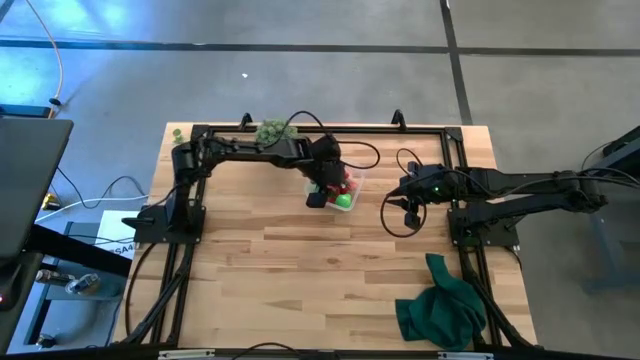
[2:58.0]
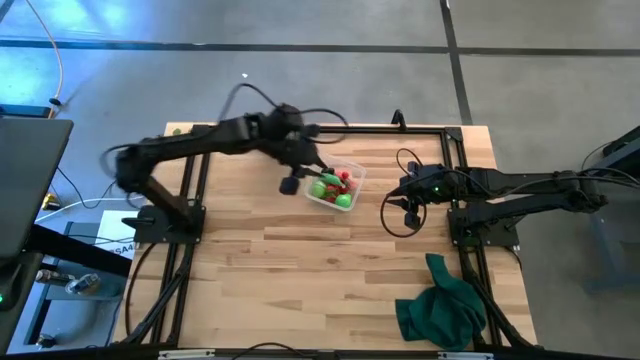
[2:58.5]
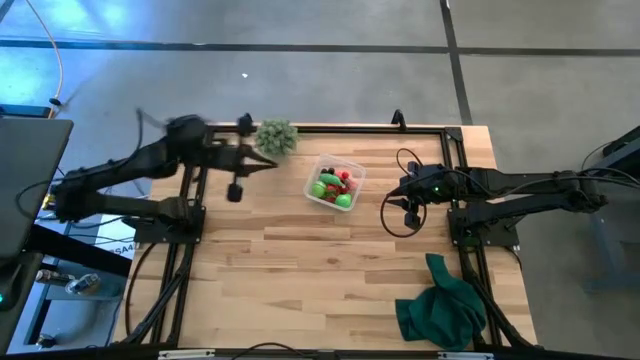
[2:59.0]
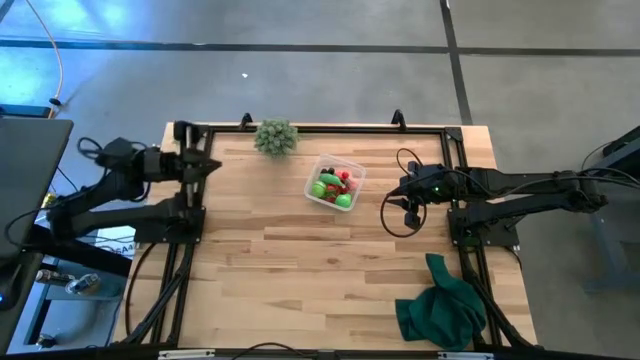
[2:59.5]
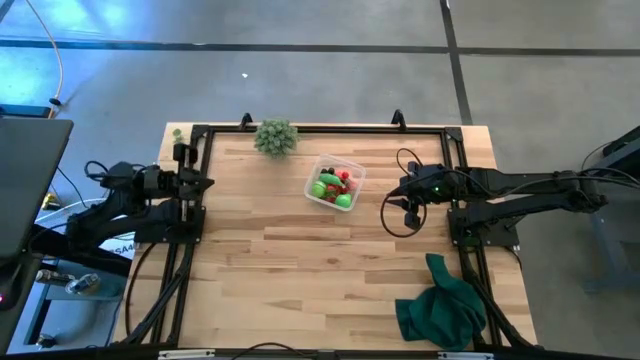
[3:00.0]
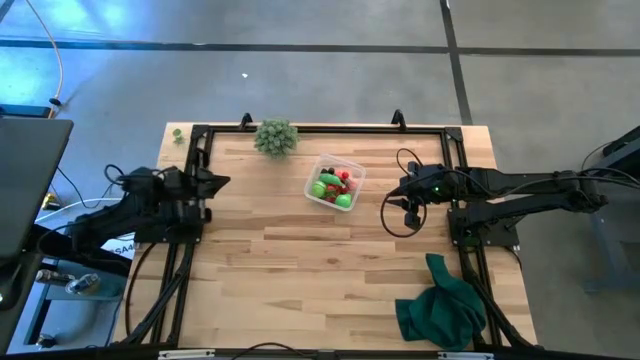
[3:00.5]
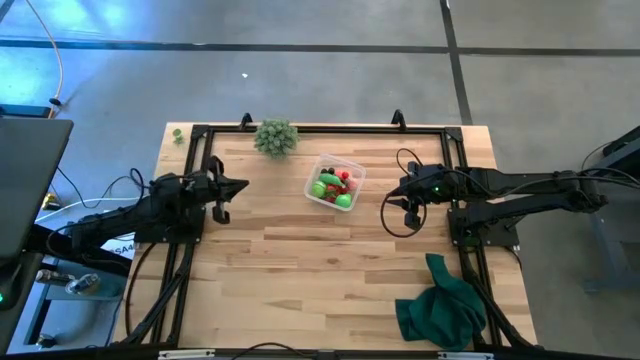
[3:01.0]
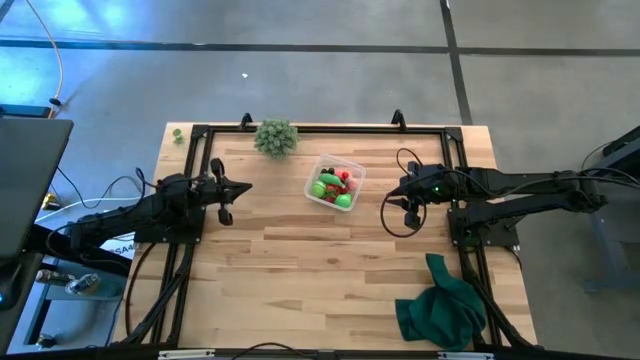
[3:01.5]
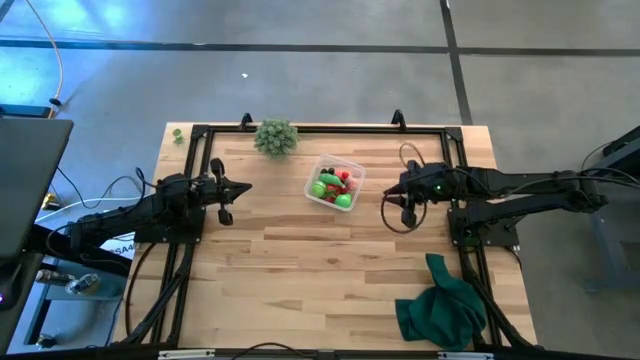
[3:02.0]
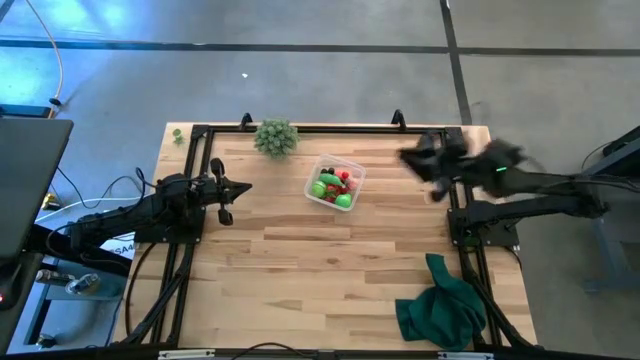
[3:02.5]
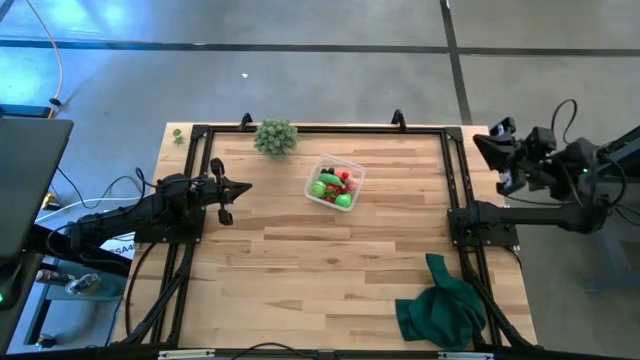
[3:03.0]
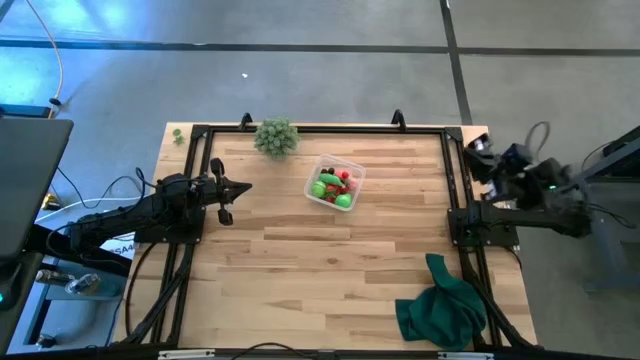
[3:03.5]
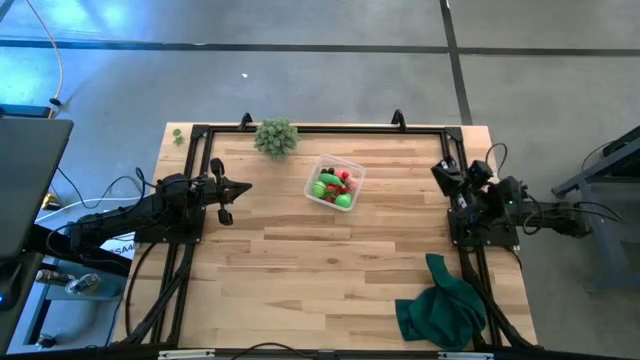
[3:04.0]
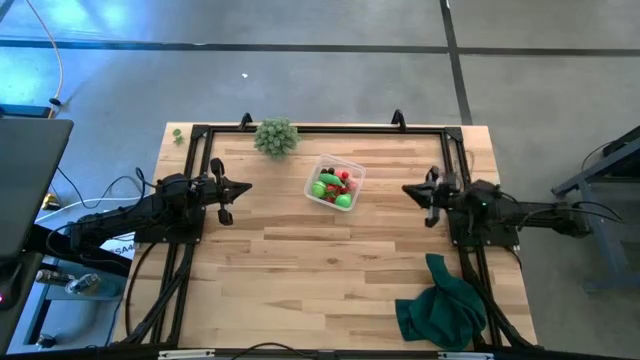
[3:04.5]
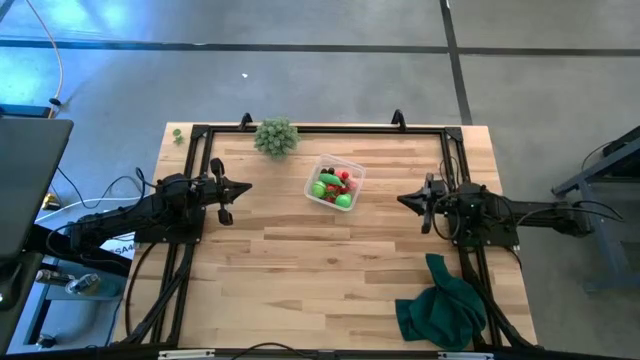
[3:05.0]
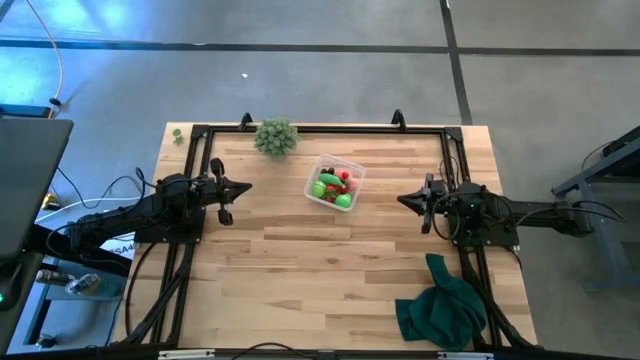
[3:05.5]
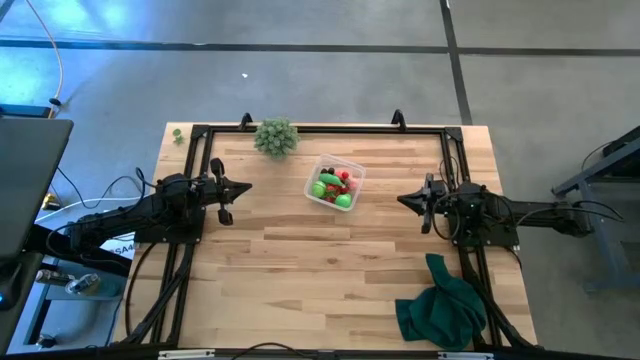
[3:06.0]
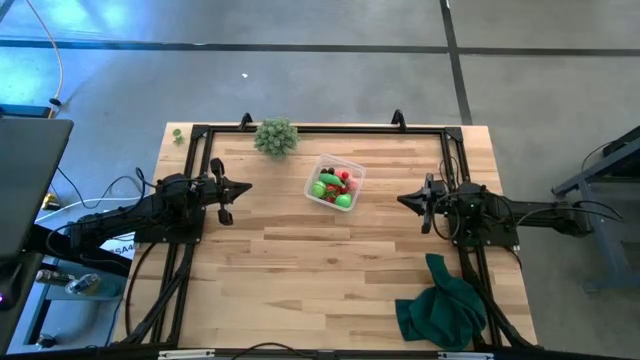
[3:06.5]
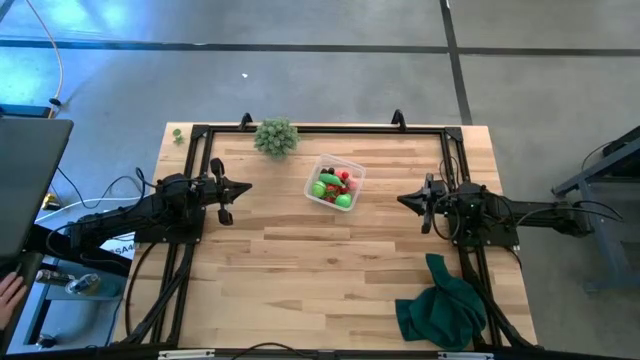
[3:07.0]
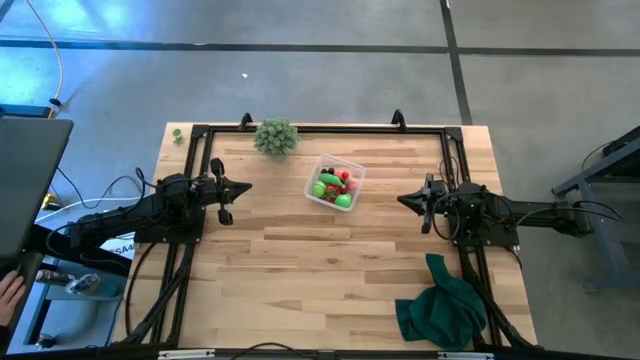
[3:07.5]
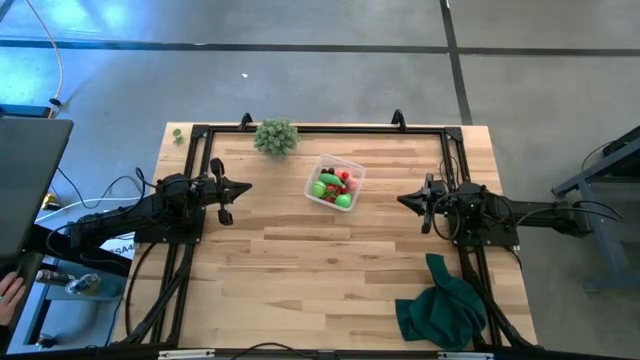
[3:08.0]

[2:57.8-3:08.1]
Task: Pick and placing Produce into tupperware
Return to Home Position

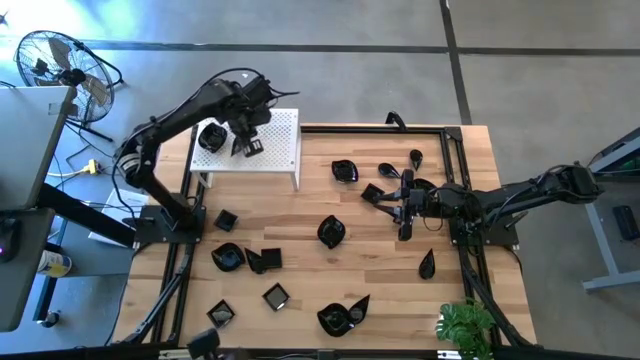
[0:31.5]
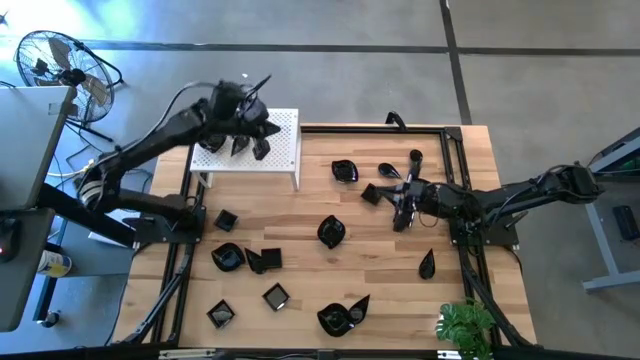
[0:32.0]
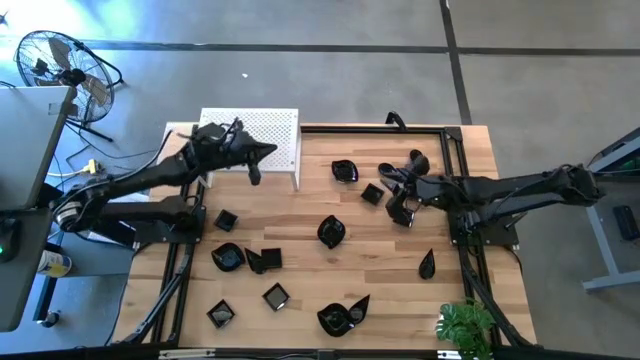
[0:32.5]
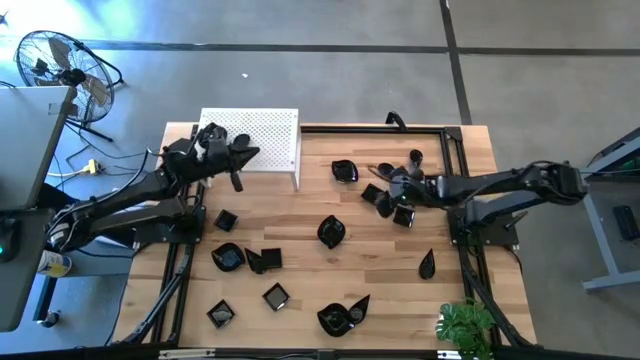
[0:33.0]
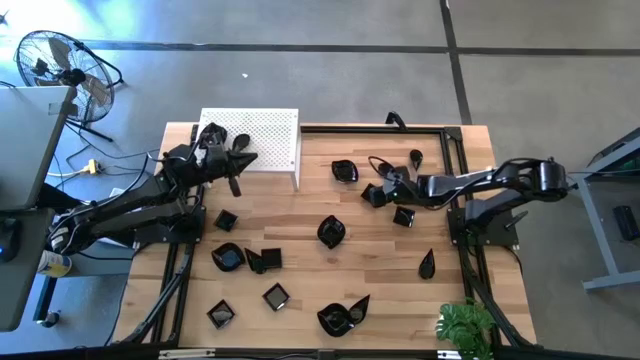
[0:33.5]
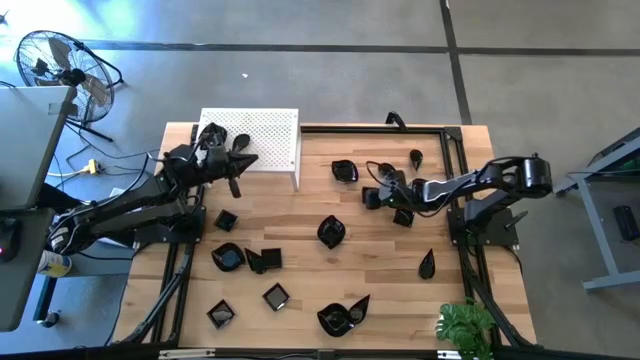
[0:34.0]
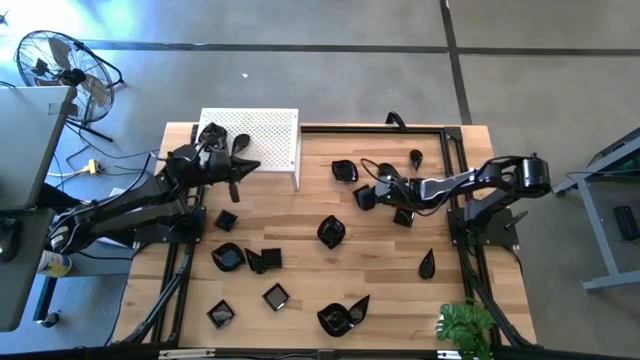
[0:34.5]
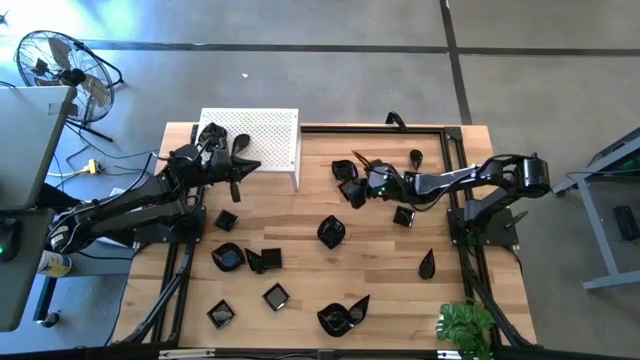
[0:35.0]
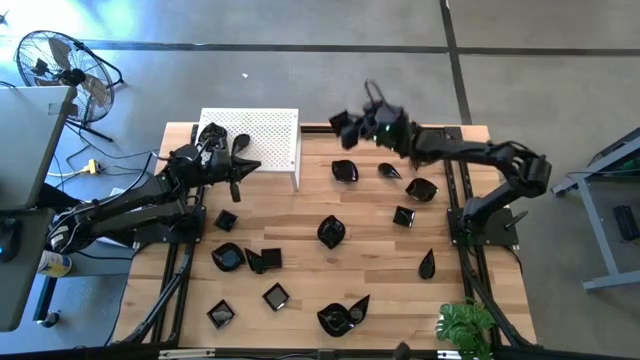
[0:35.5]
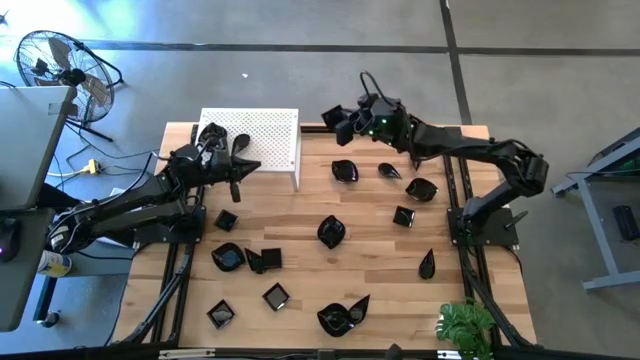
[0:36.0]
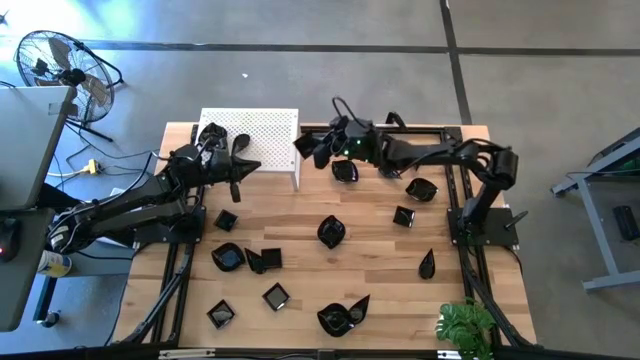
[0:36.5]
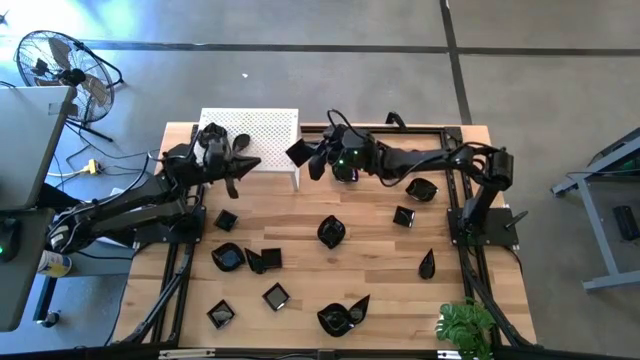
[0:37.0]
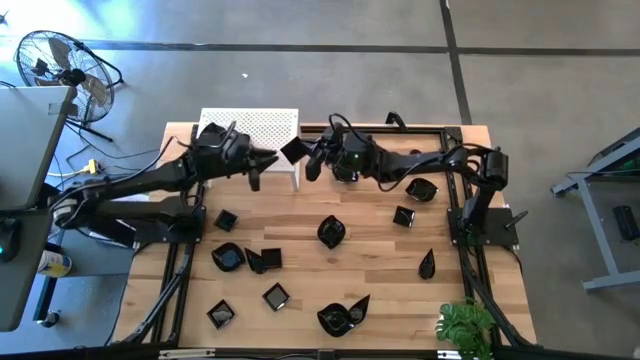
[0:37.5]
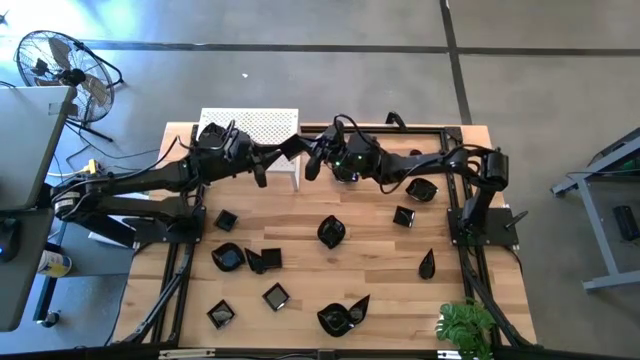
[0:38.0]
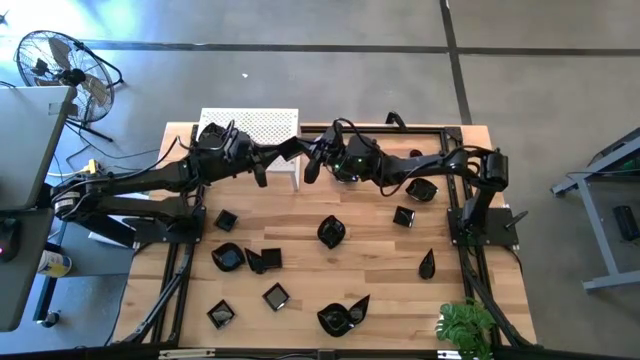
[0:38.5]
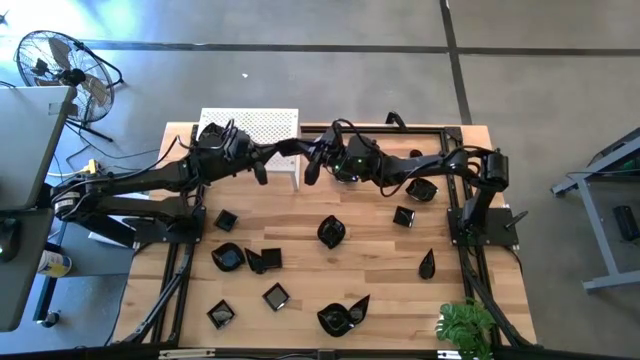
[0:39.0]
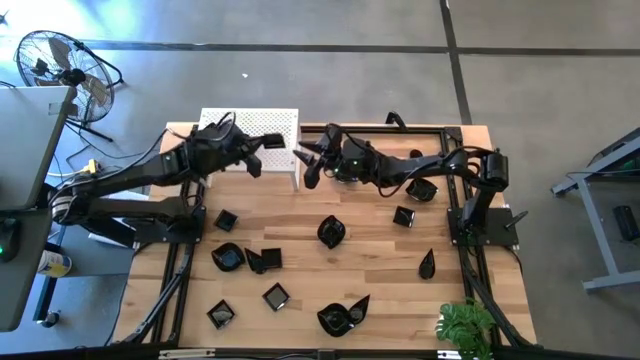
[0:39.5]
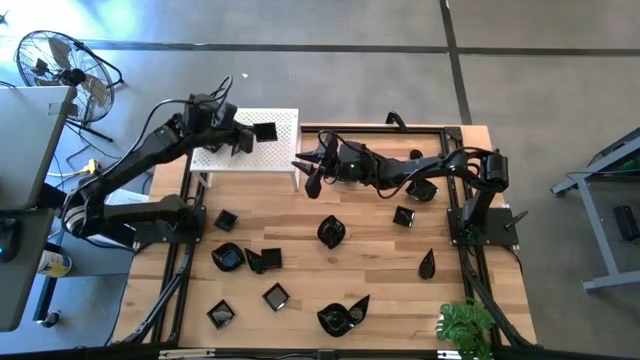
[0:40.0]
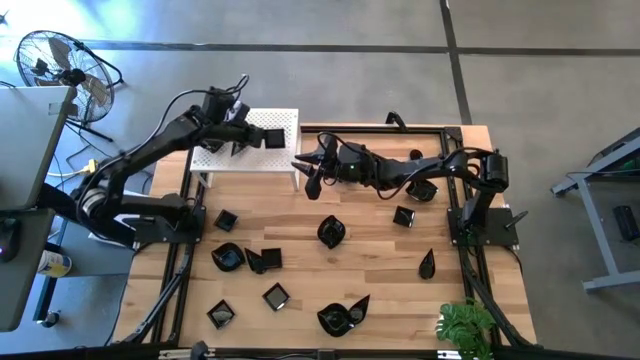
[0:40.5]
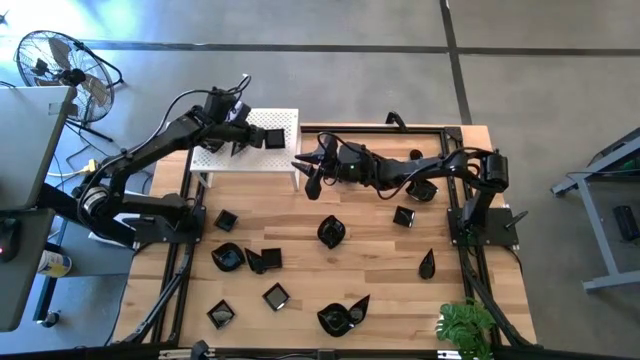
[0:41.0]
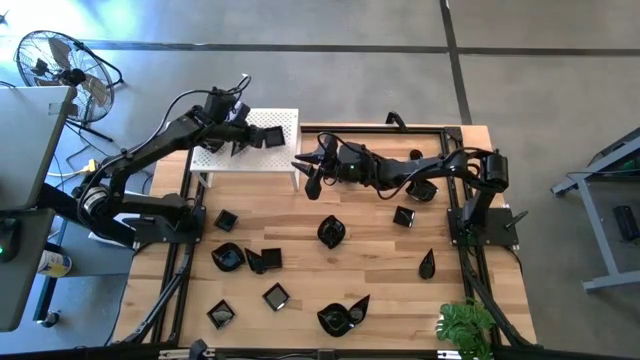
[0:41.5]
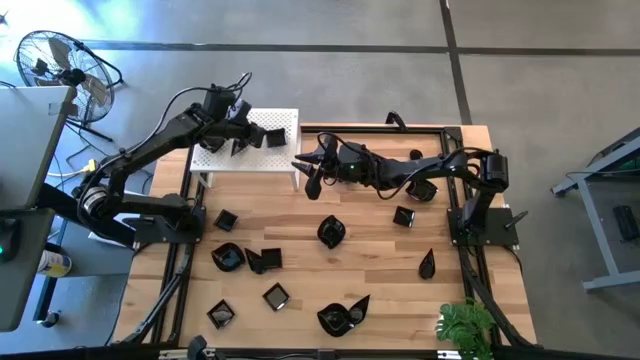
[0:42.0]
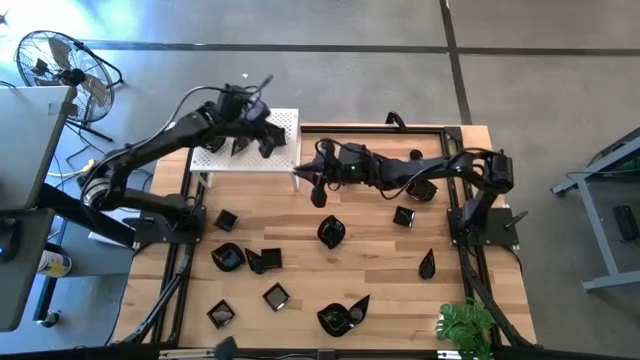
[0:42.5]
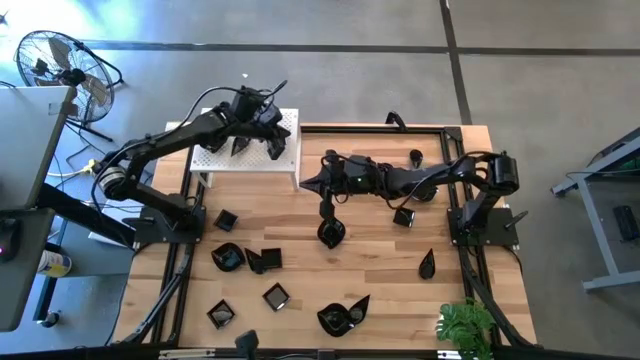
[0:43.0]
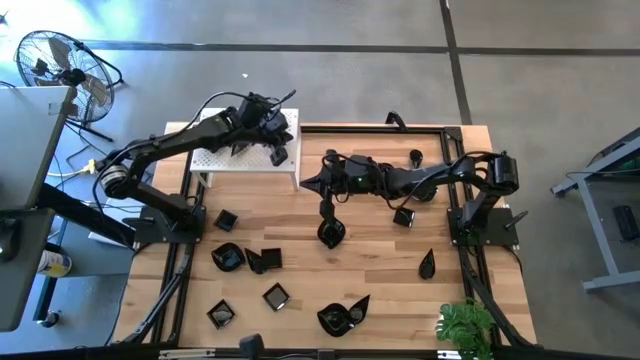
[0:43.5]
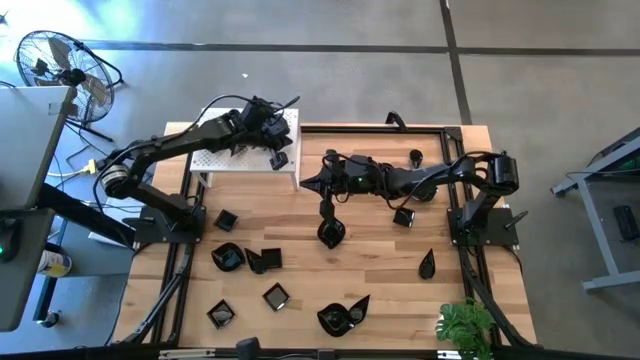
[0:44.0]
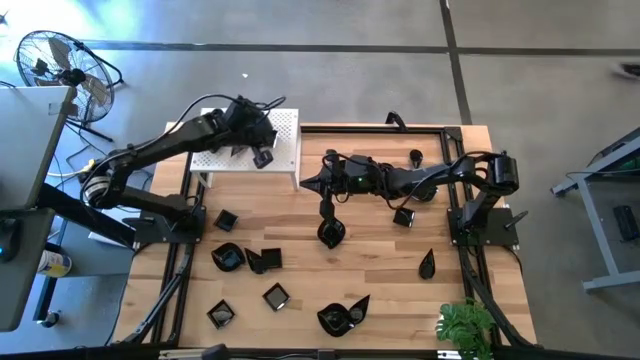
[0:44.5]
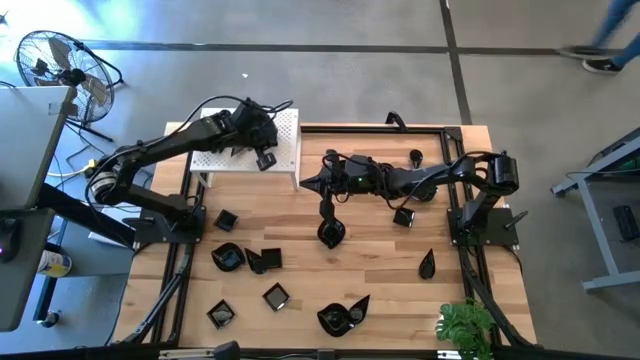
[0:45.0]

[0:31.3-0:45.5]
Task: Pick & Place Mini shaped plates
Put the black square plate on the shelf
